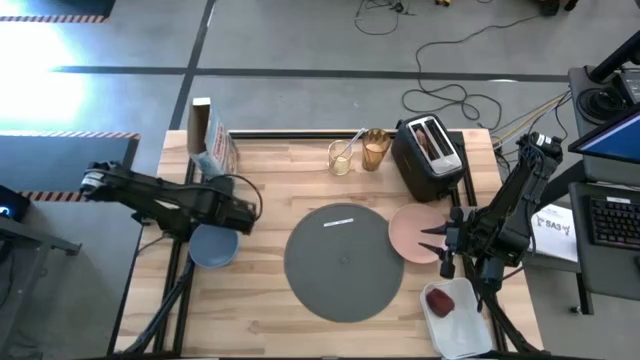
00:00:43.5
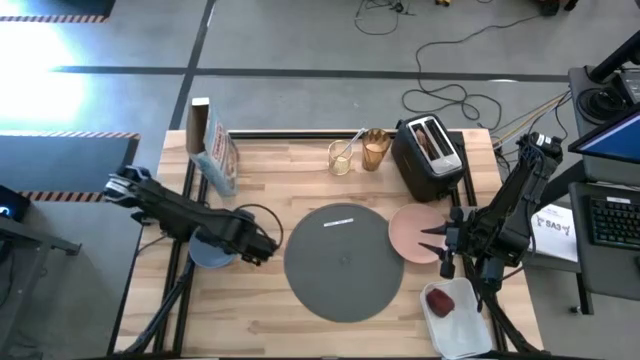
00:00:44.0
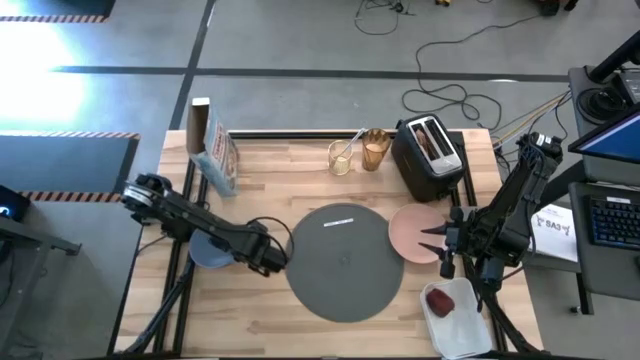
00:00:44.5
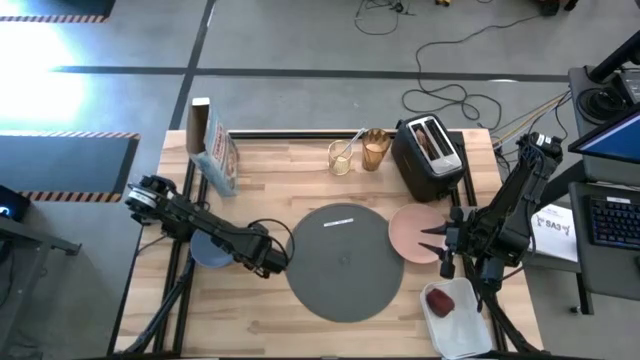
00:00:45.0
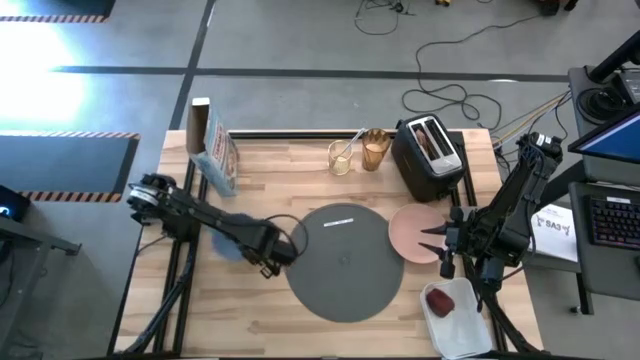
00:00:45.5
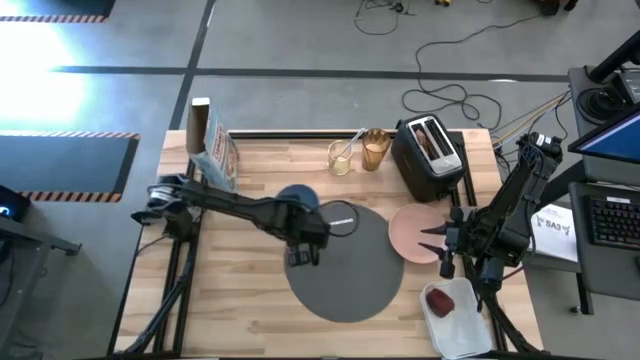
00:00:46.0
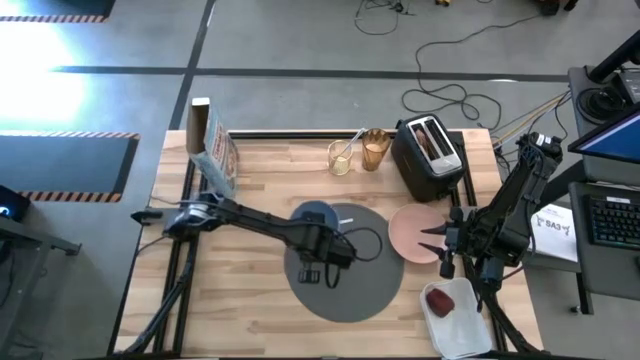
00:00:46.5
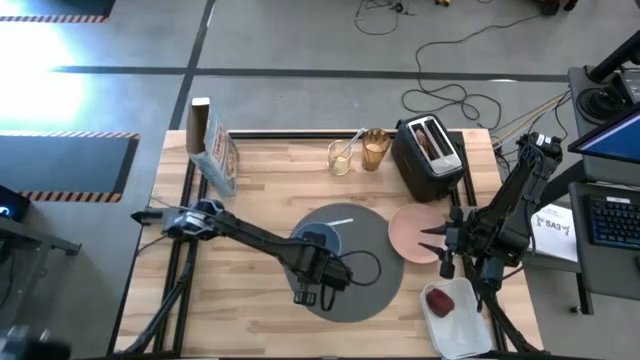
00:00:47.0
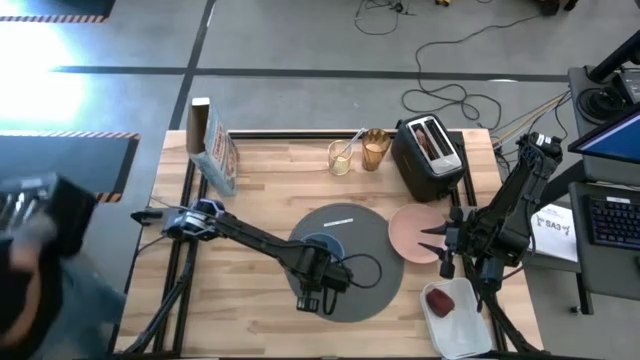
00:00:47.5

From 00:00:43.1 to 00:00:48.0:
Task: Arrange a breakfast setting
Put the blue bowl on the gray table placemat

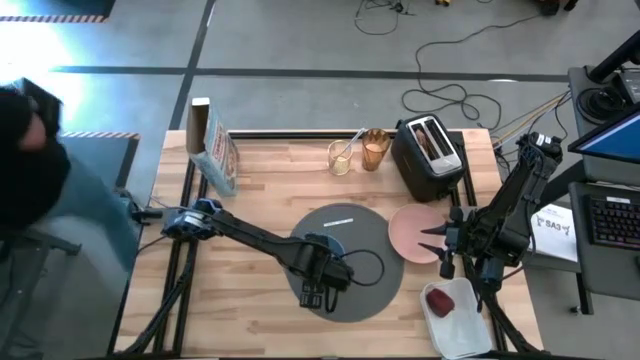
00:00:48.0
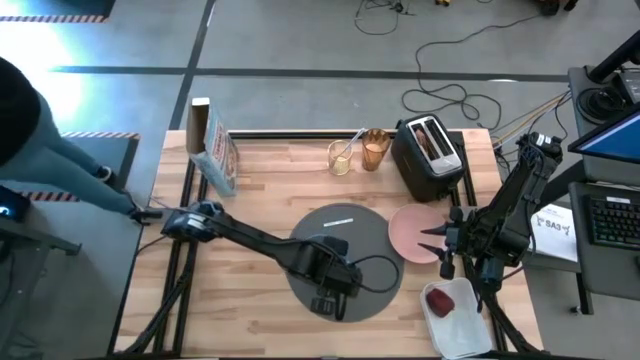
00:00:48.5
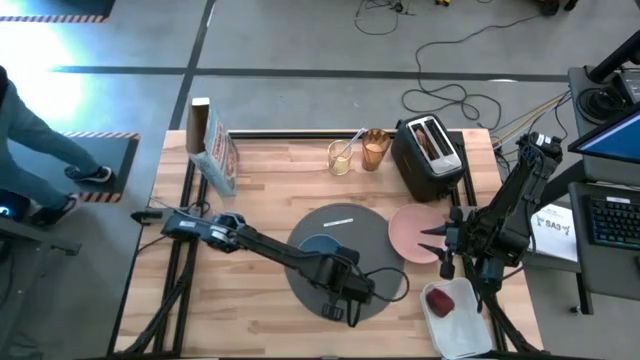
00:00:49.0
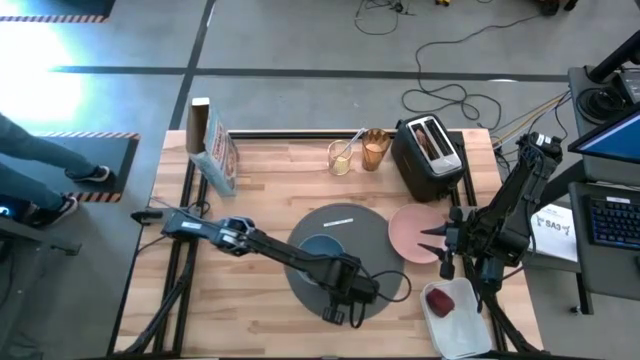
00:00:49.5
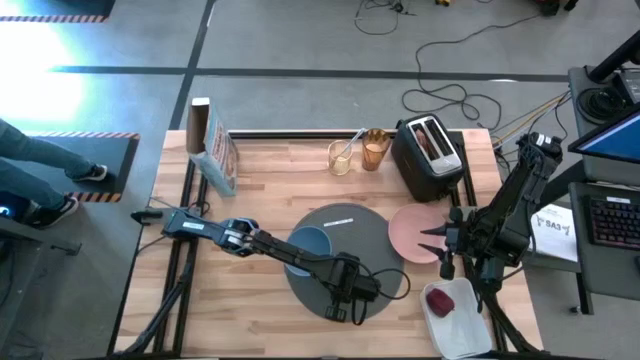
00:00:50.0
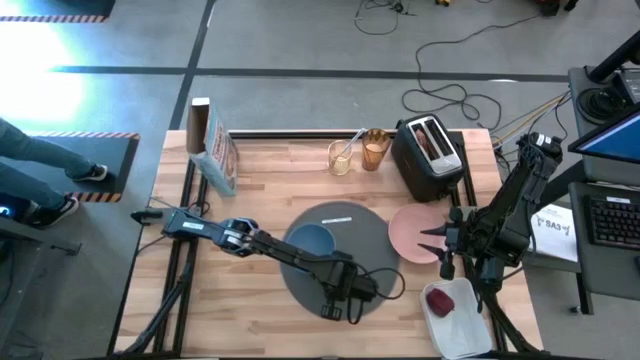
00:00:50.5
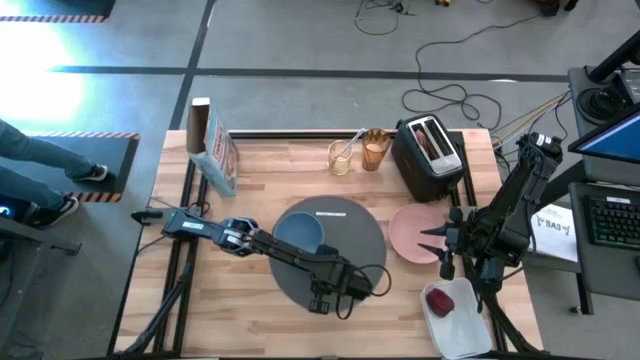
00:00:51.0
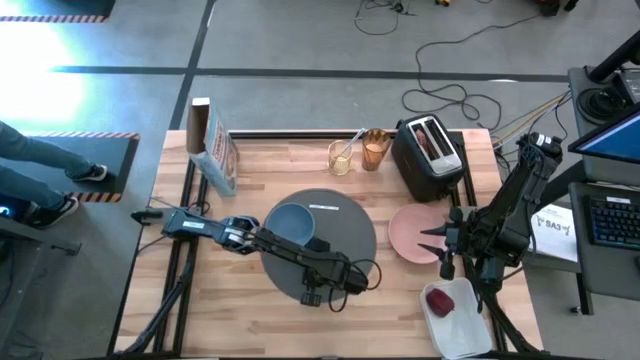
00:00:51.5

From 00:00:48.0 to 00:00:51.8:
Adjust the gray table placemat

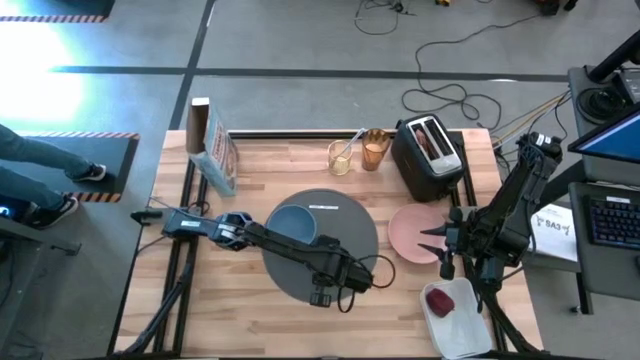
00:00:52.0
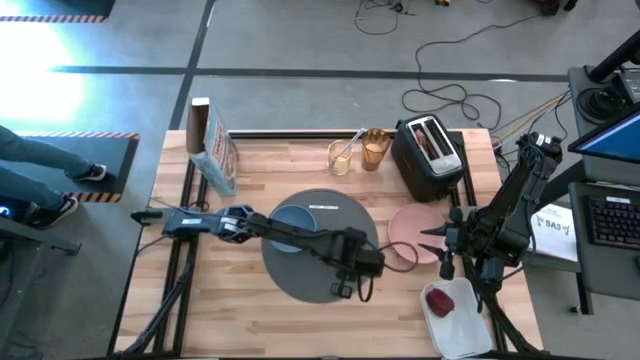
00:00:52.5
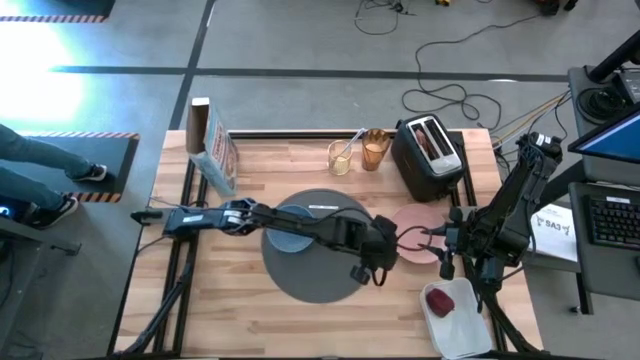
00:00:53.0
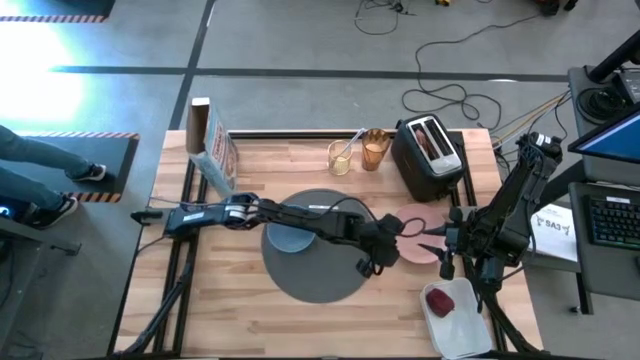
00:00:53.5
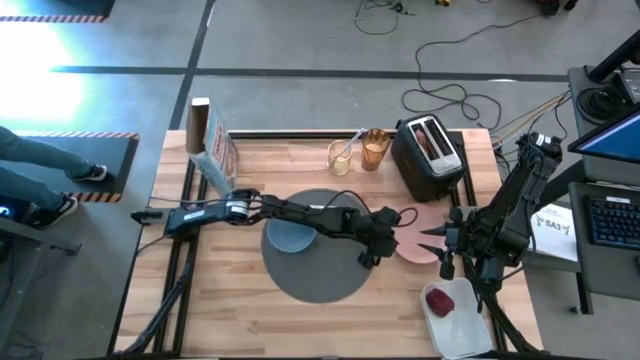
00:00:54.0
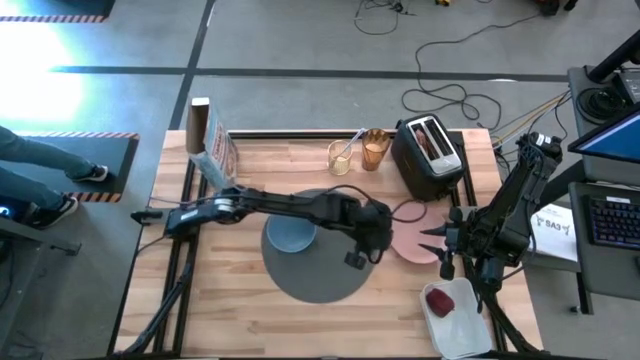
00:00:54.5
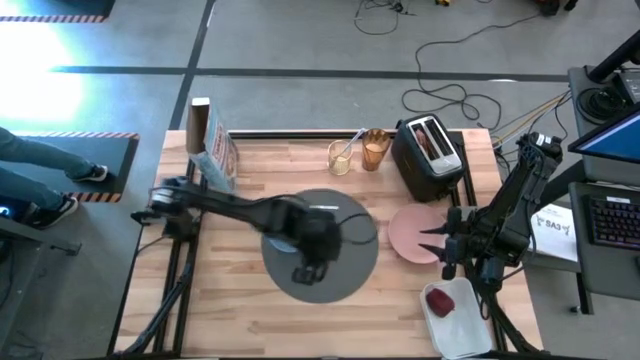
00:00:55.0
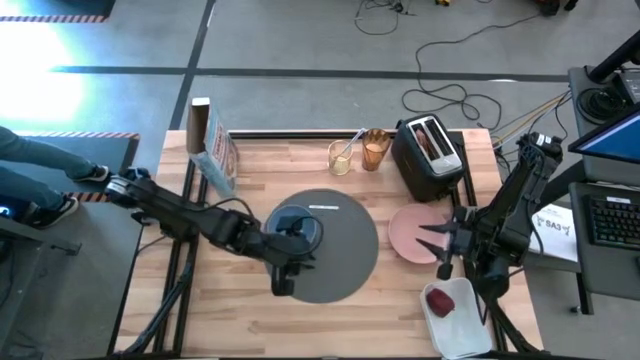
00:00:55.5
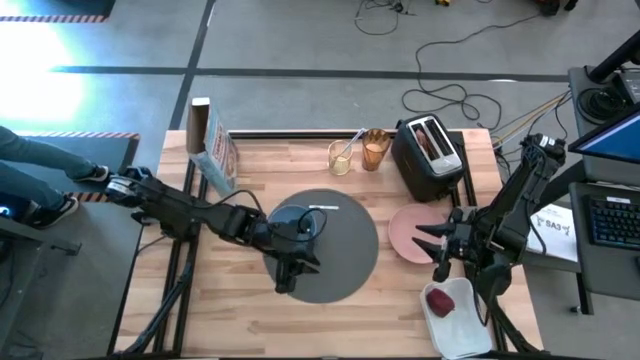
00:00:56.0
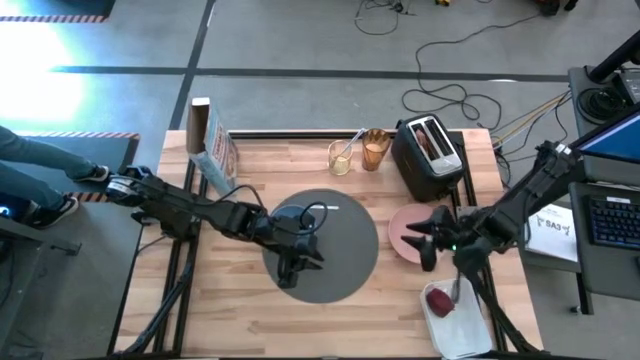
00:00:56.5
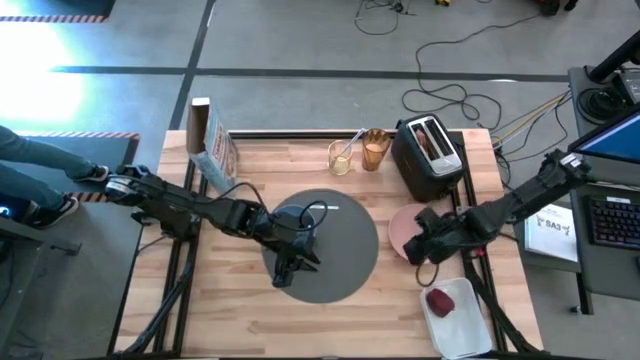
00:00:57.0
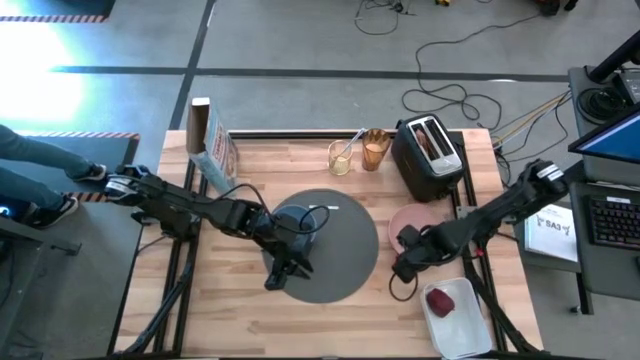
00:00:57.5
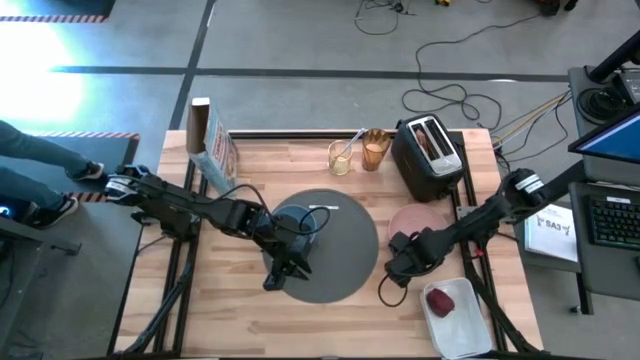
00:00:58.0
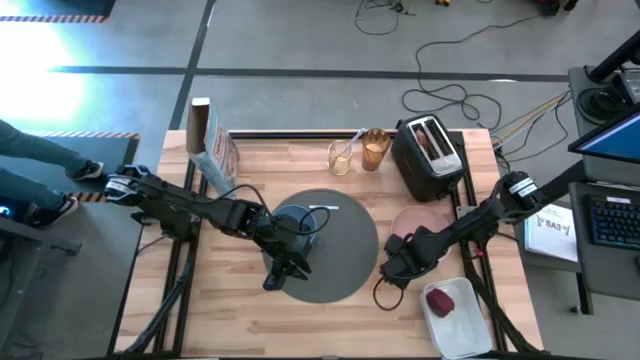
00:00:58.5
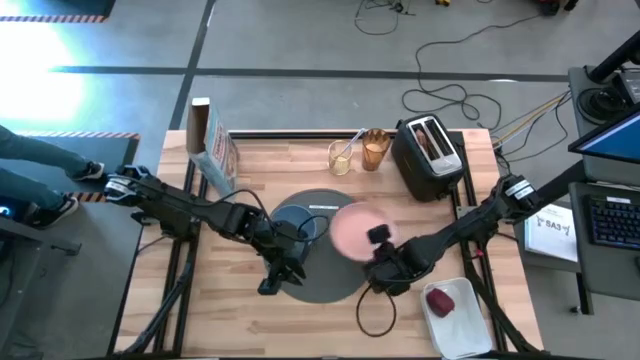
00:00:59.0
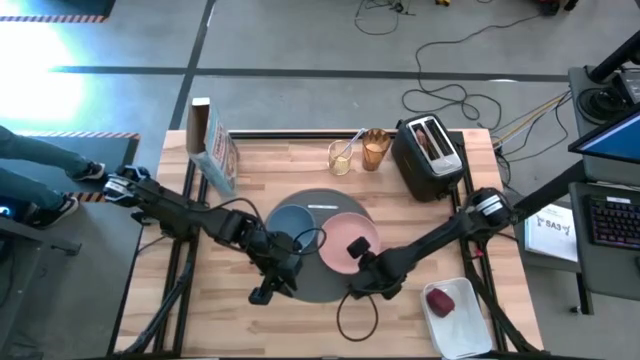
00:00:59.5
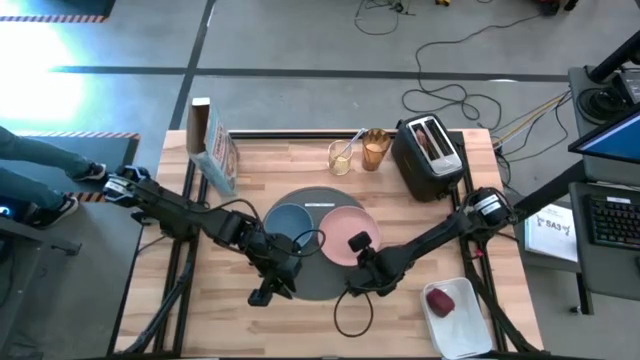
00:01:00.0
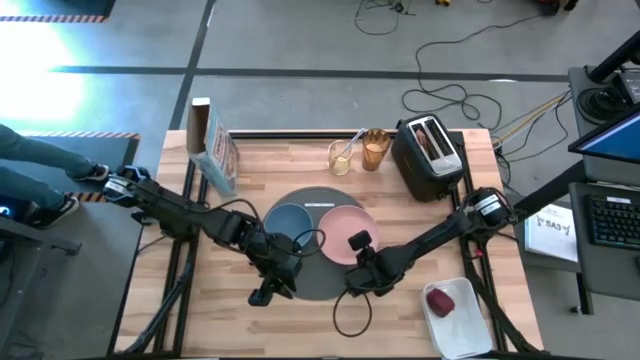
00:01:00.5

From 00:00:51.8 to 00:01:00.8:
Put the pink plate right side of the blue bowl on the gray table placemat

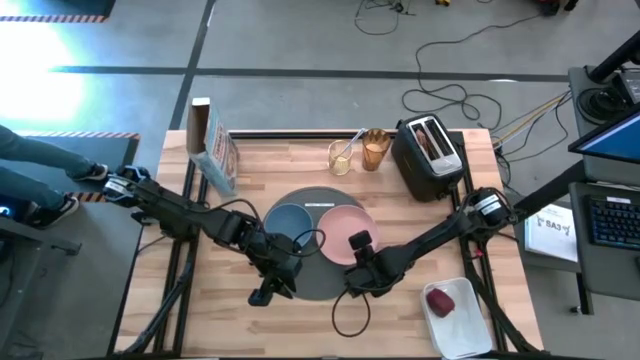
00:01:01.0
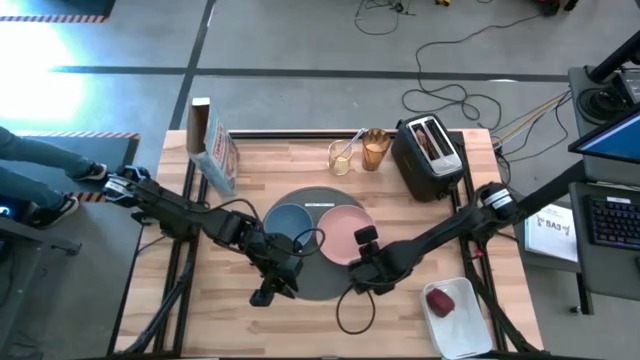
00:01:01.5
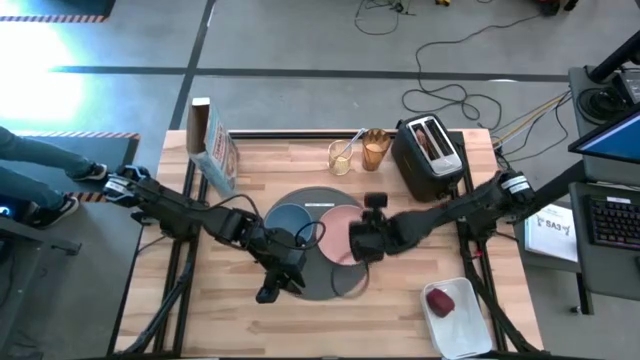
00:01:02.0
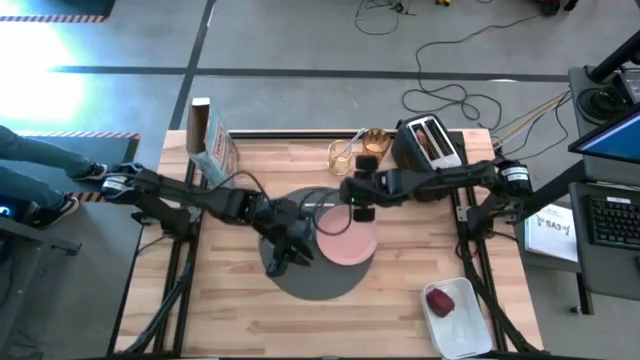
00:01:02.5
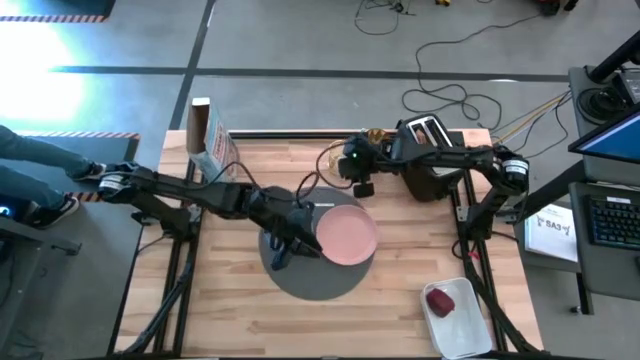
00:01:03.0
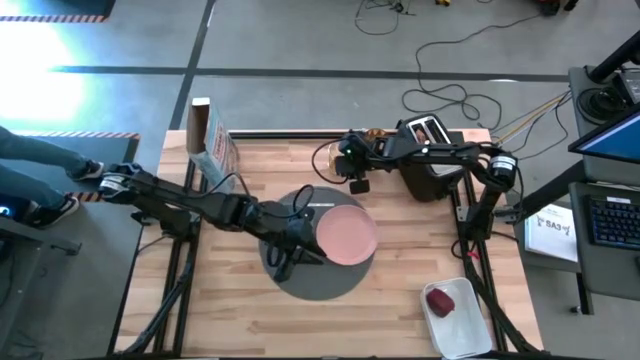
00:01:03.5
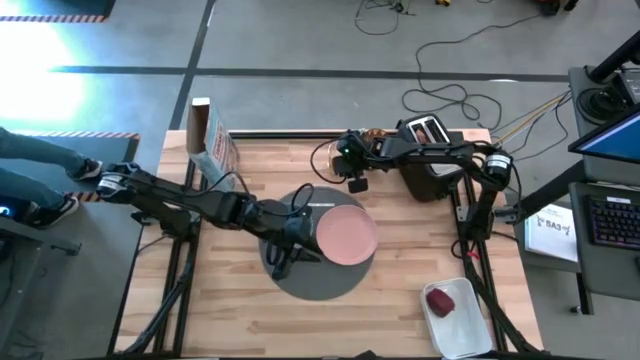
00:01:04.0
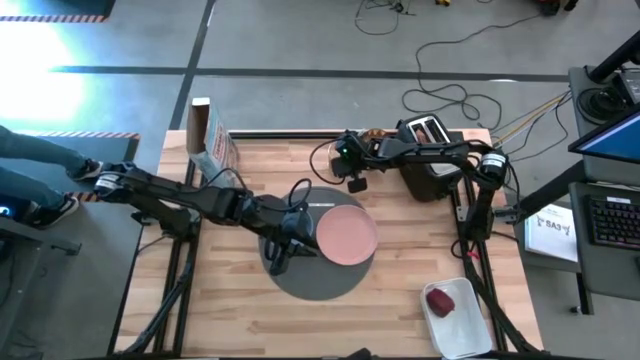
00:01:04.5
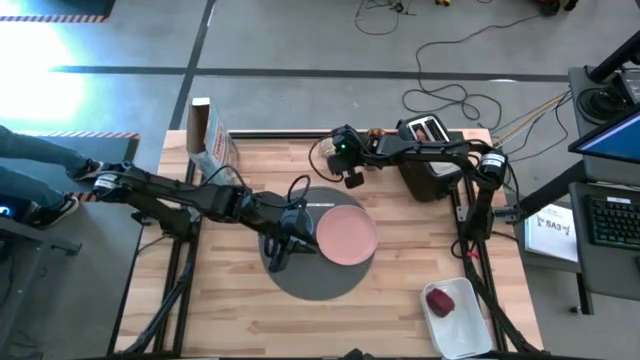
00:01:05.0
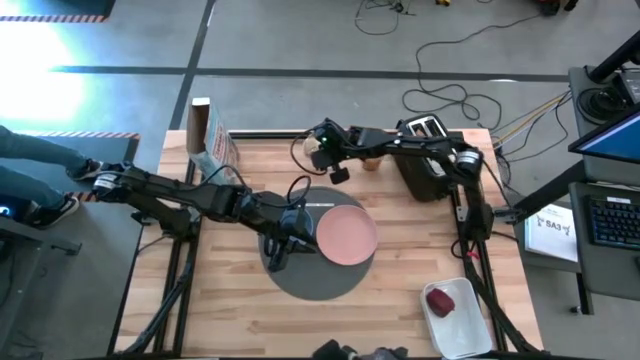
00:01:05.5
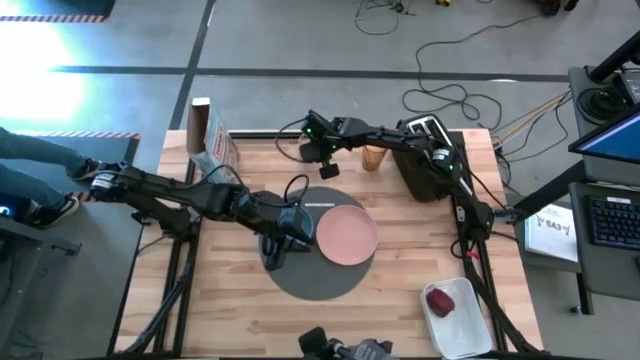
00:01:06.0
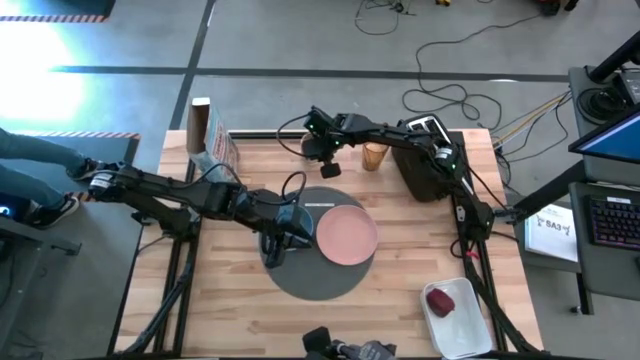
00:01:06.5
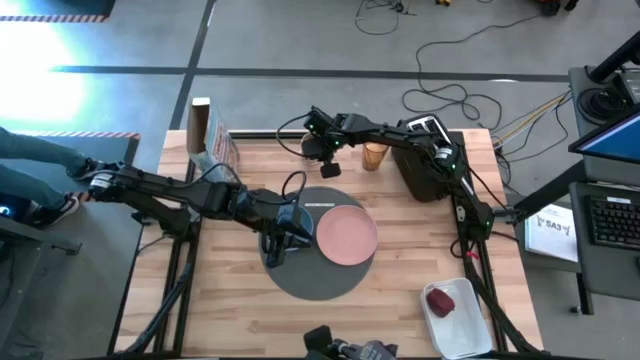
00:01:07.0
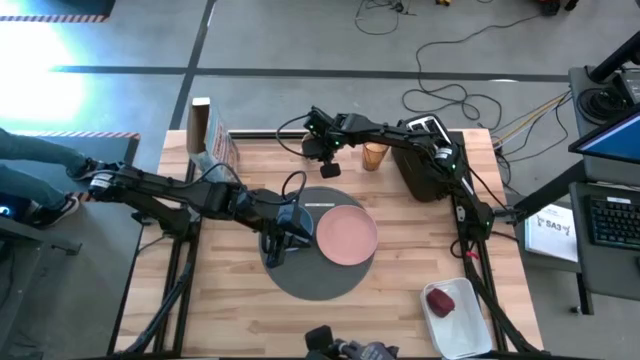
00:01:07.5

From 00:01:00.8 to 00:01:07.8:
Adjust the utensil holder
